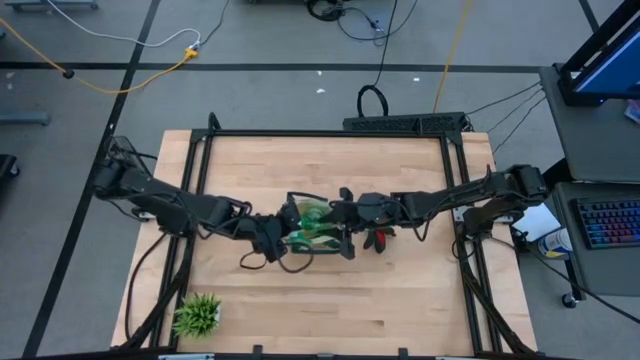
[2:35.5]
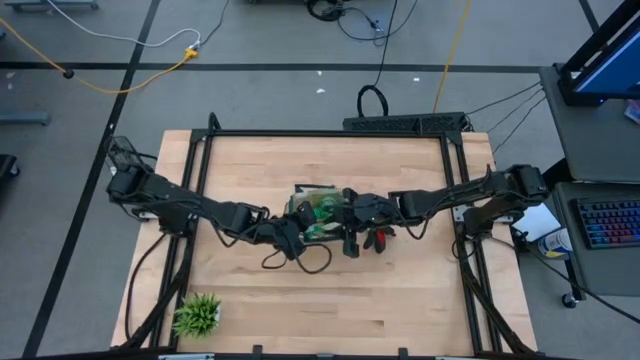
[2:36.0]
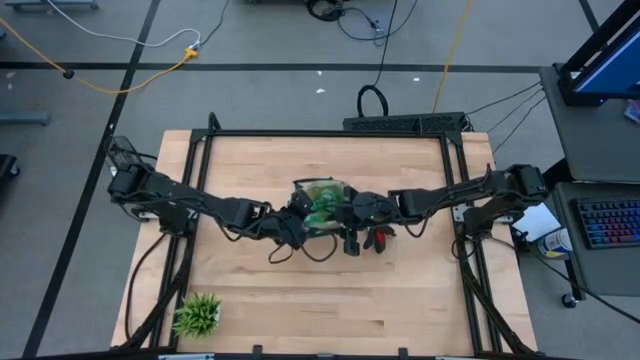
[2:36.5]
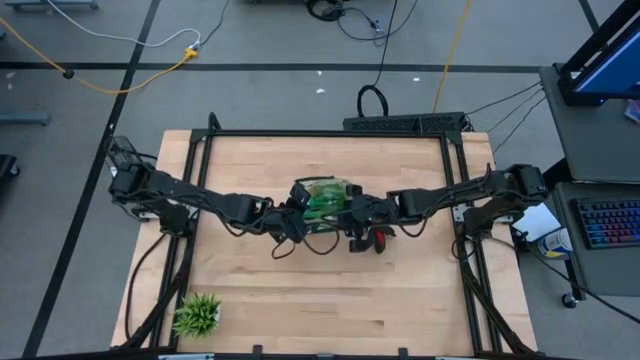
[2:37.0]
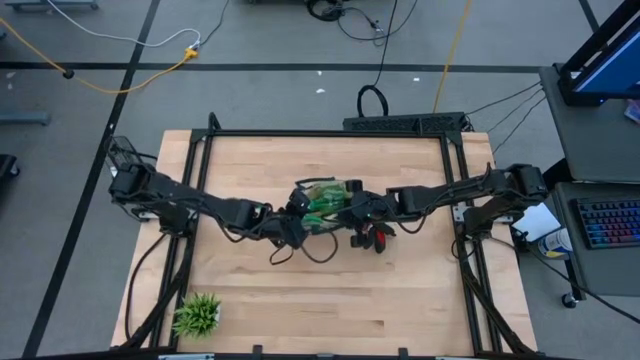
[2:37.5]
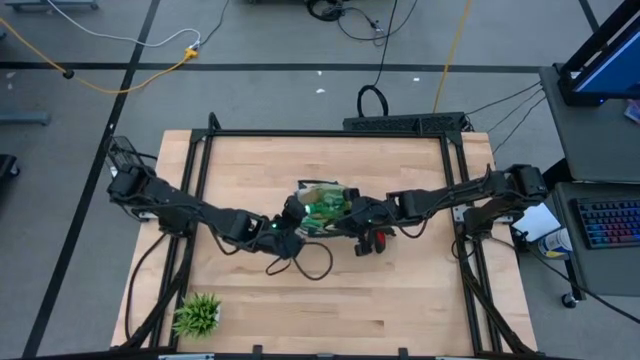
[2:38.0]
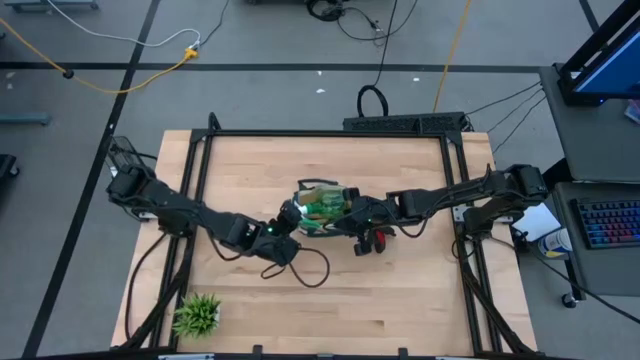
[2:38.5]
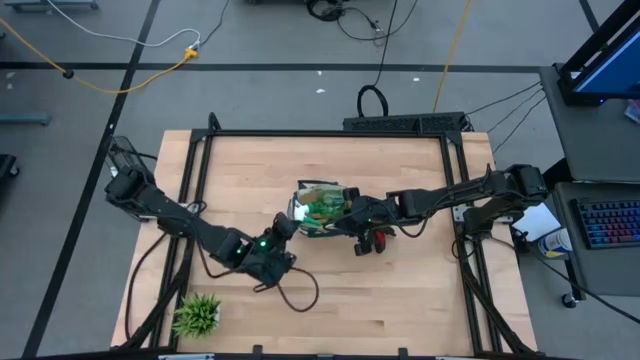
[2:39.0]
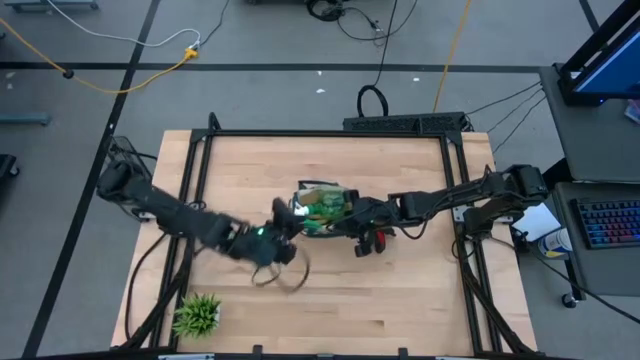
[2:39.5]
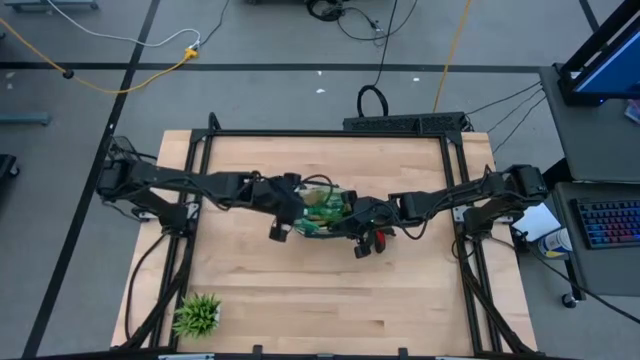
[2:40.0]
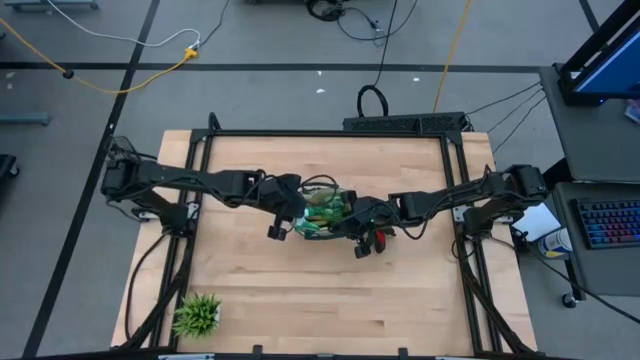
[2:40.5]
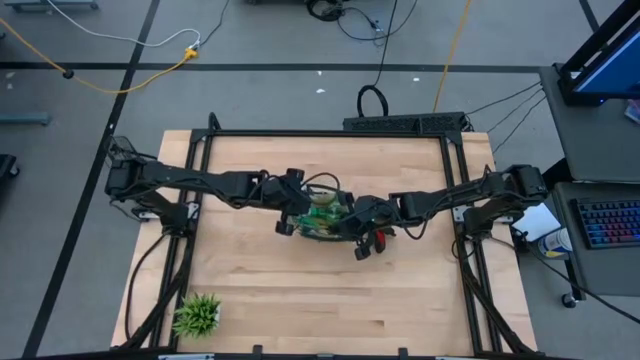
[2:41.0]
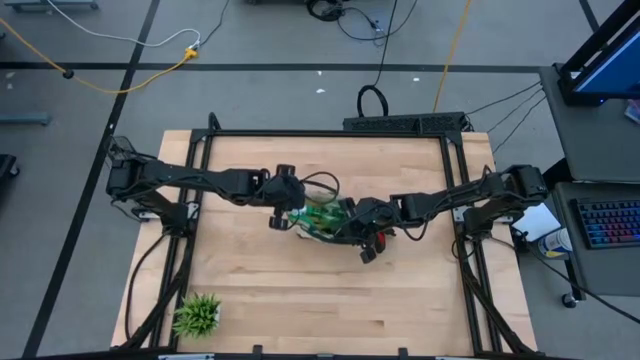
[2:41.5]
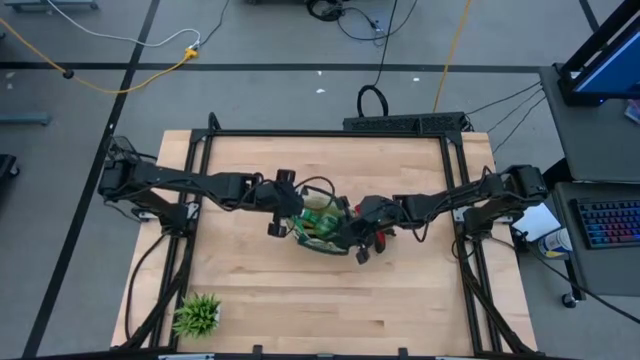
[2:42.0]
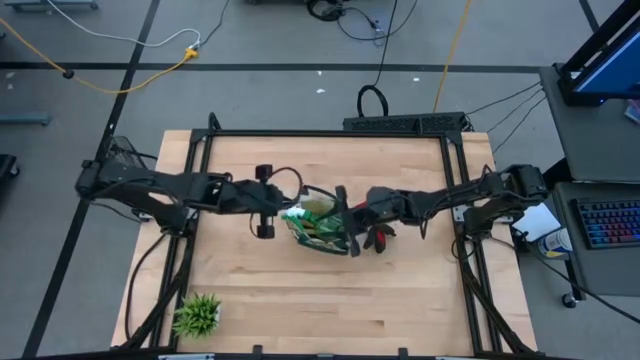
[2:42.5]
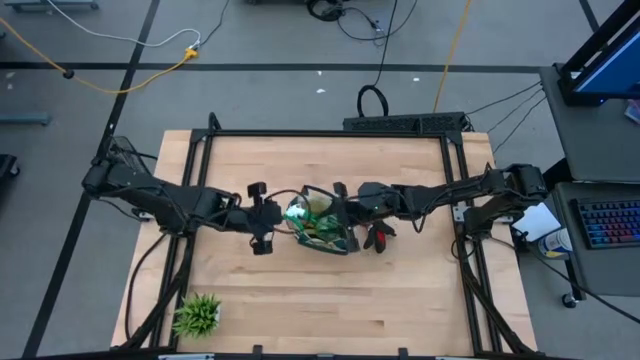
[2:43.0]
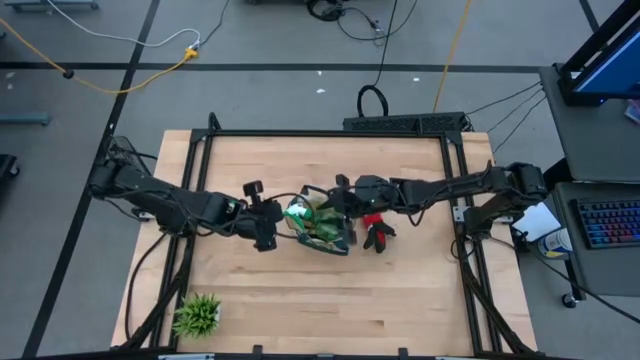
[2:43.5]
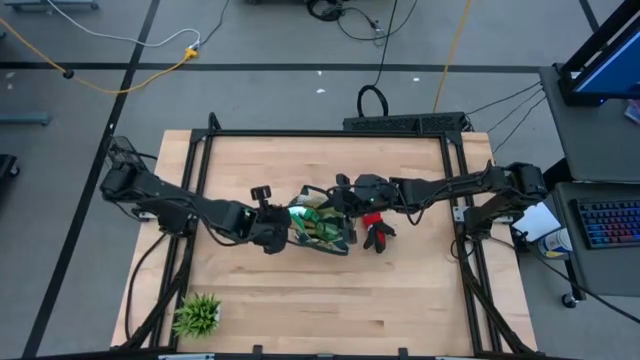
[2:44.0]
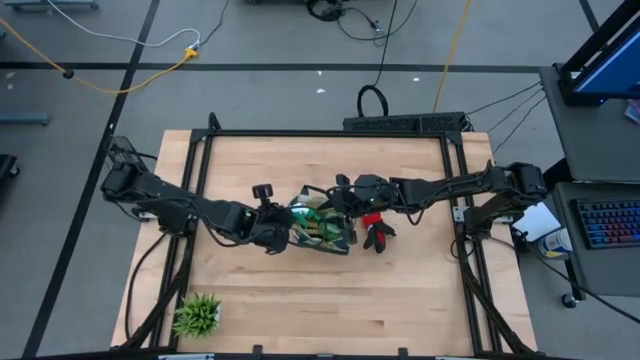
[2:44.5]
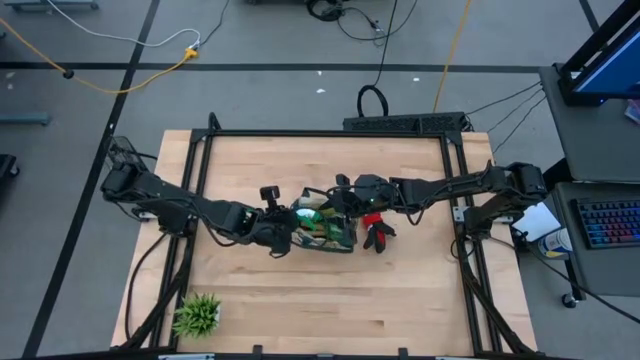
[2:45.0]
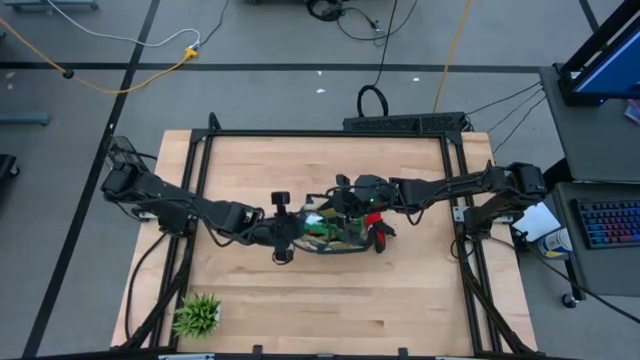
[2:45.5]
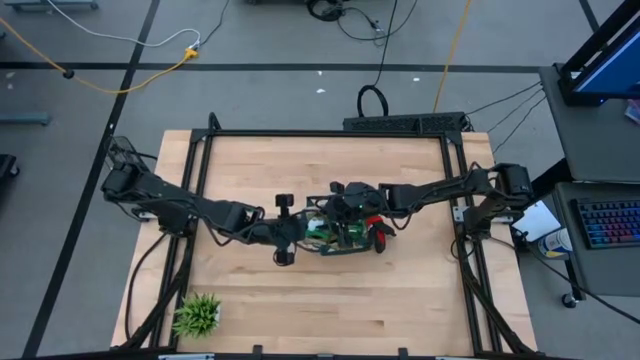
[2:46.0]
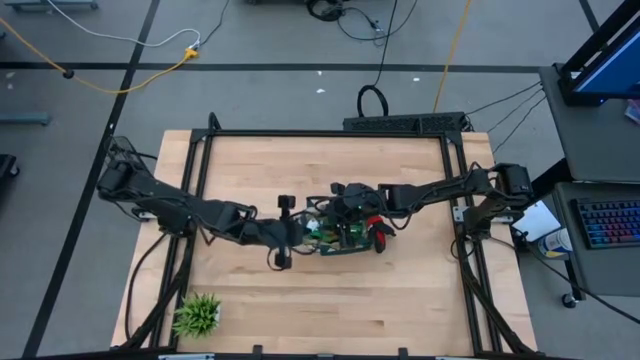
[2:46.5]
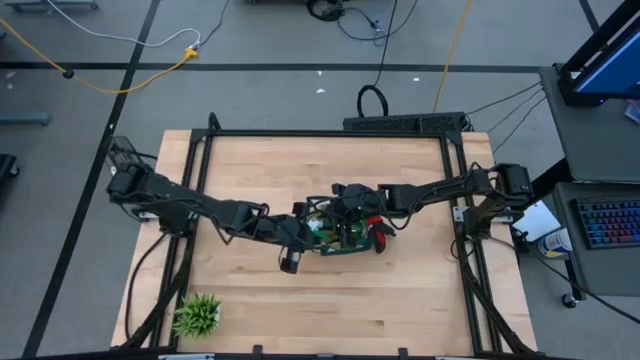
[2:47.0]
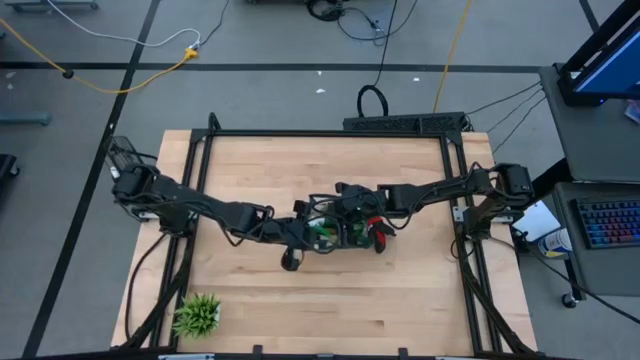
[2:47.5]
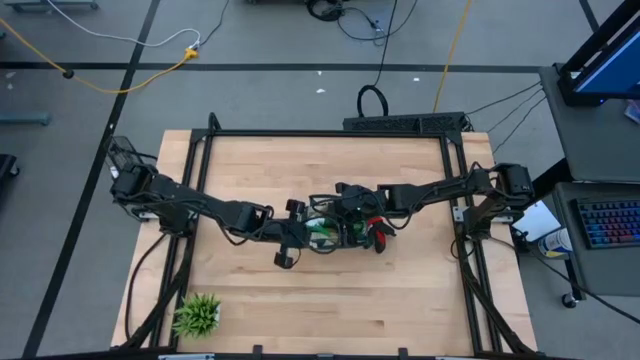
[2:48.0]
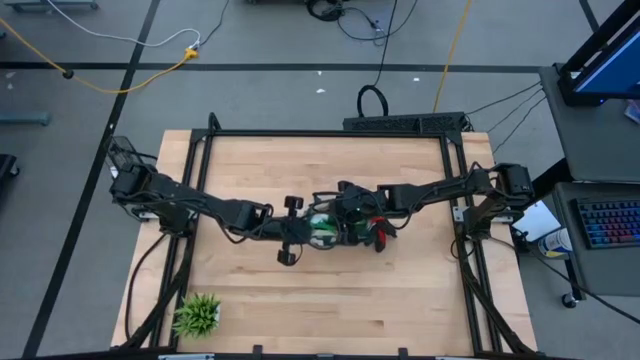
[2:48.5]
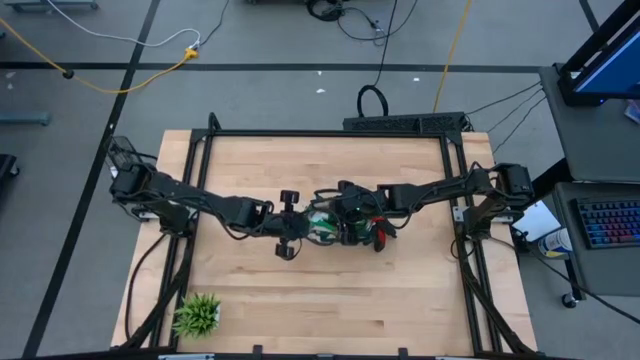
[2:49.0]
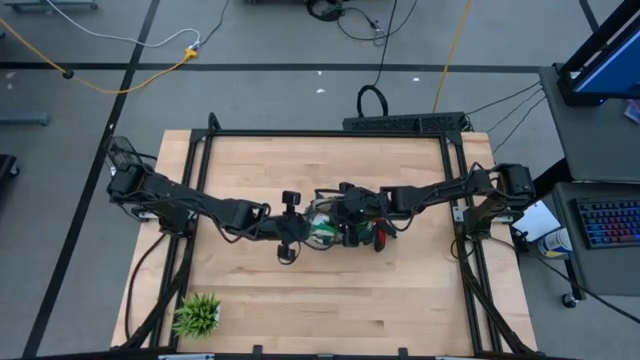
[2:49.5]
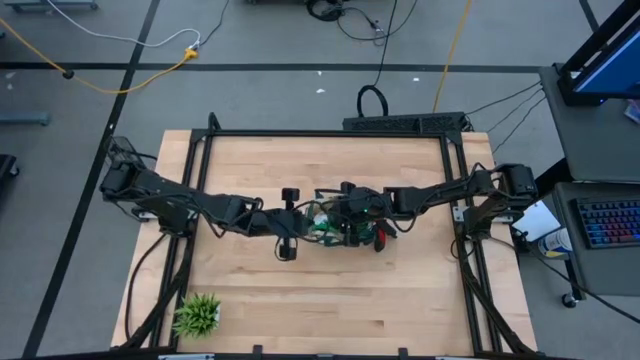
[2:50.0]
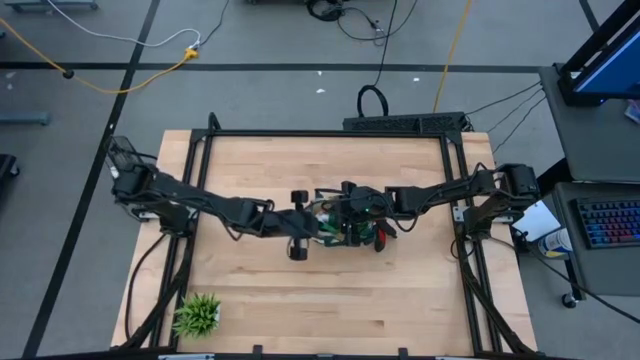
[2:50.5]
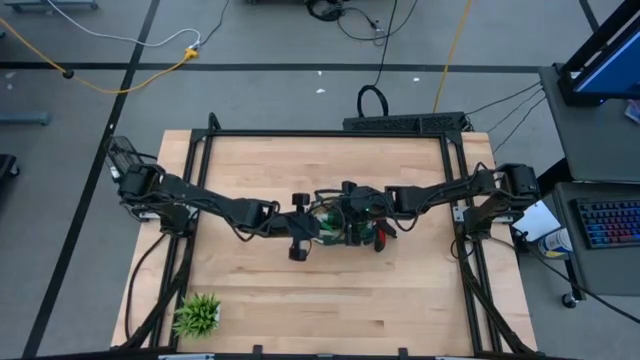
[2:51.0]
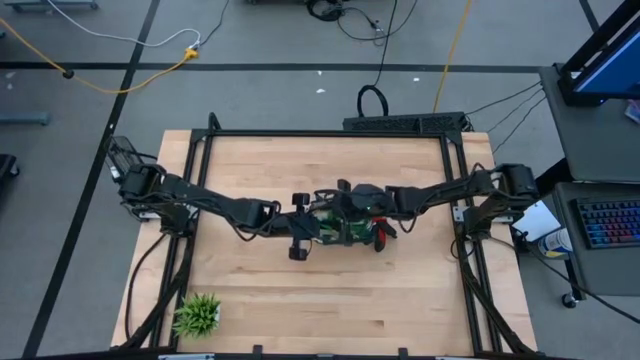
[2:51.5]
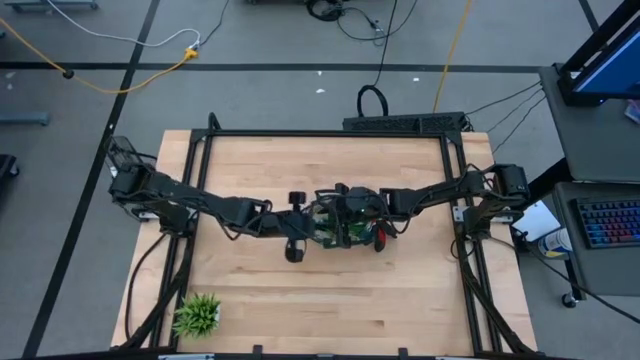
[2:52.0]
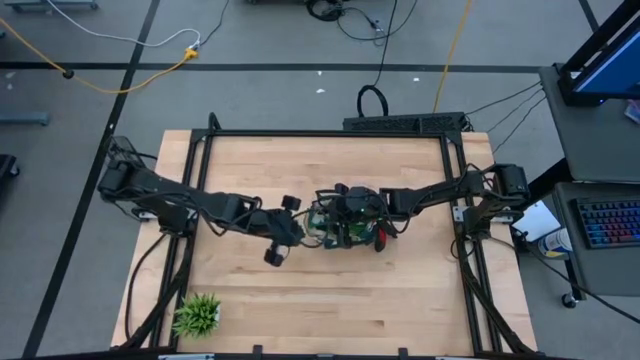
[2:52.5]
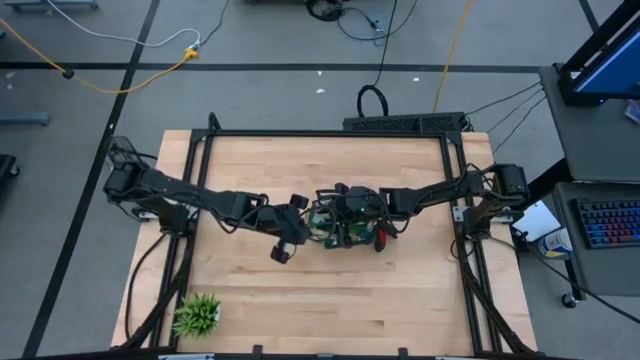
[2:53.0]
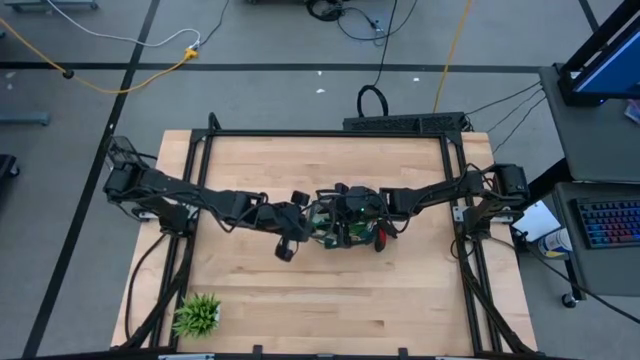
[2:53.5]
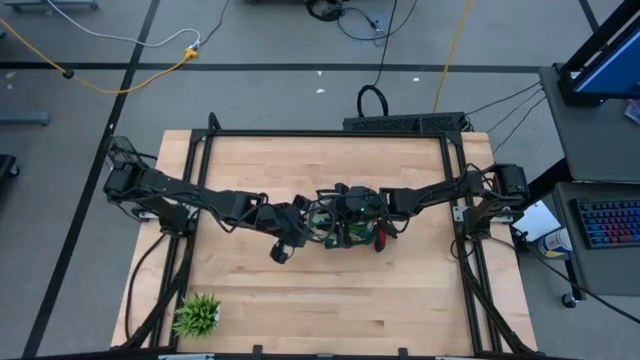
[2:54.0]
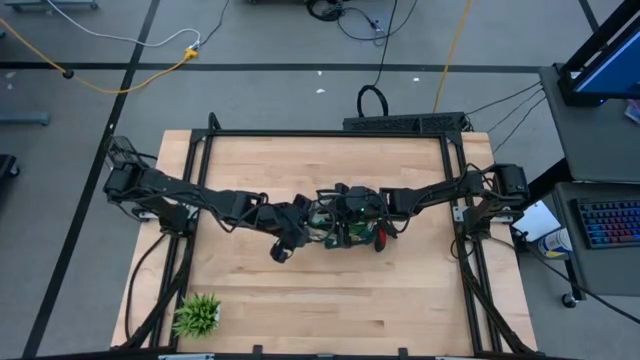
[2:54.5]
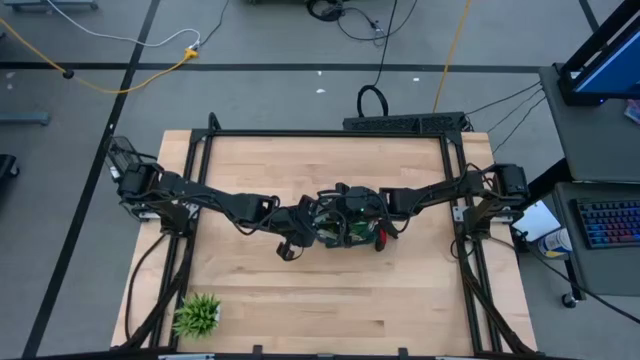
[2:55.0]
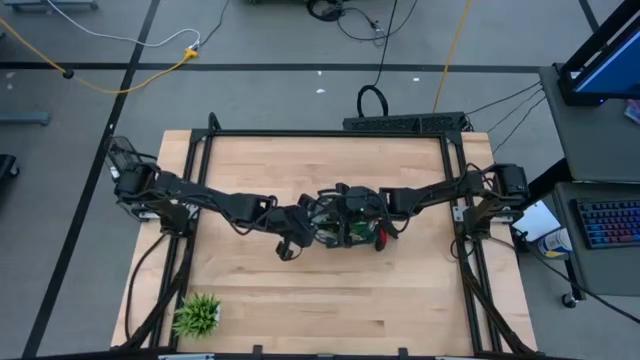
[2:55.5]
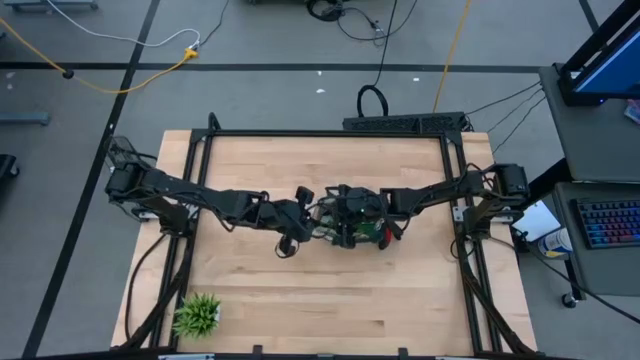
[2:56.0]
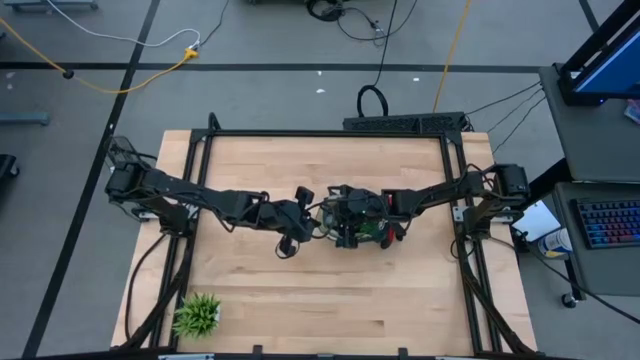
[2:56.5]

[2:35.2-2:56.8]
Task: Pick & Place Garden tools in Gardening bag
Put the green sprayer into the green gardening bag
